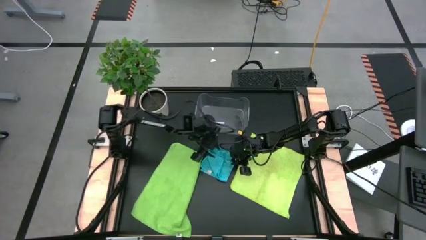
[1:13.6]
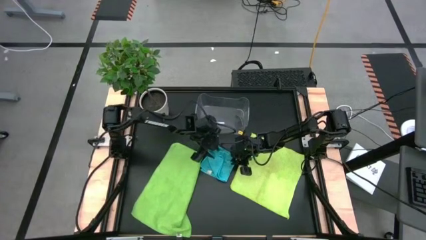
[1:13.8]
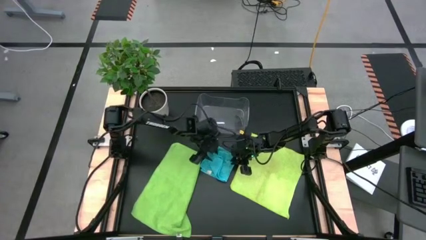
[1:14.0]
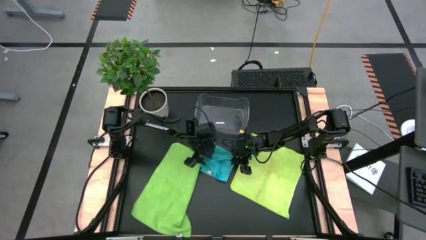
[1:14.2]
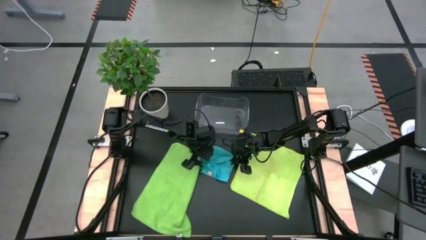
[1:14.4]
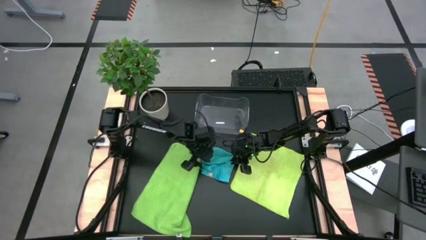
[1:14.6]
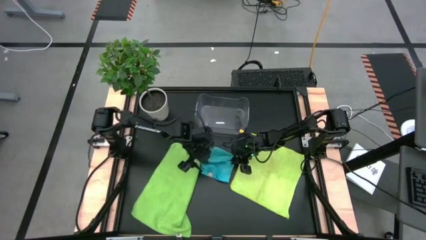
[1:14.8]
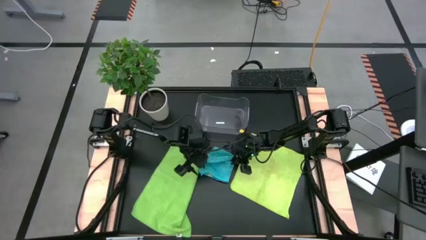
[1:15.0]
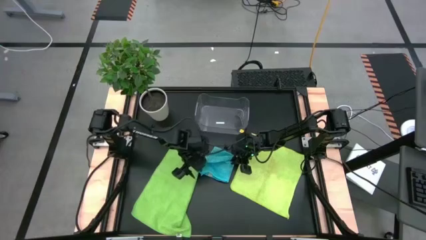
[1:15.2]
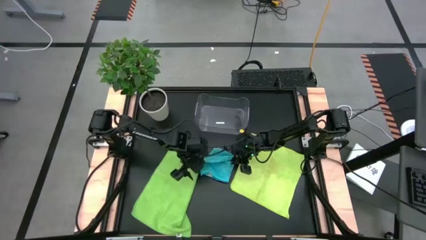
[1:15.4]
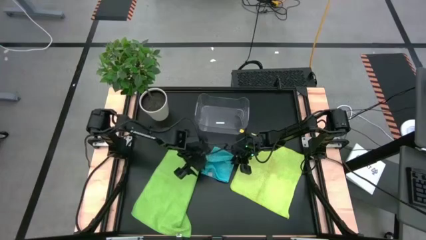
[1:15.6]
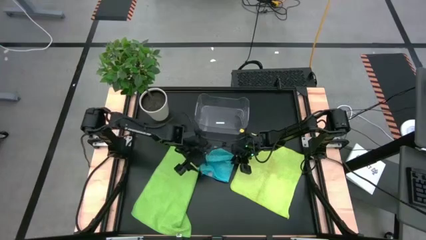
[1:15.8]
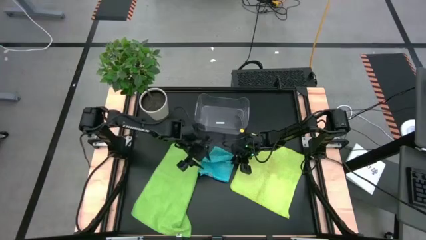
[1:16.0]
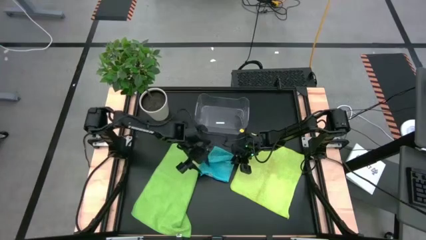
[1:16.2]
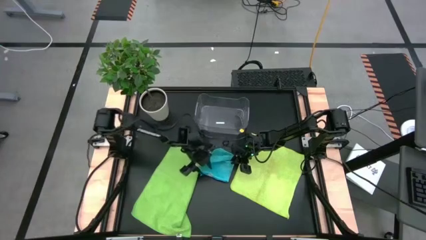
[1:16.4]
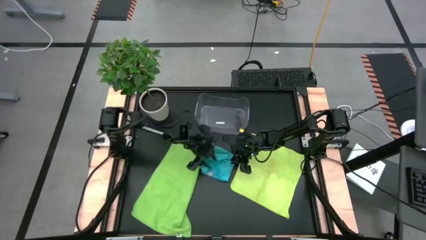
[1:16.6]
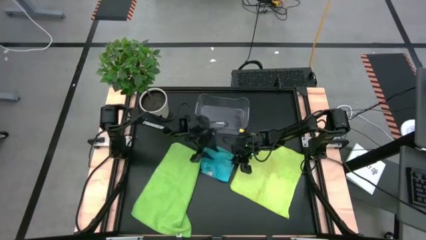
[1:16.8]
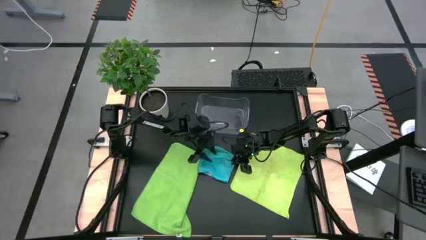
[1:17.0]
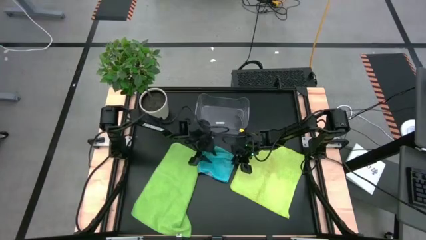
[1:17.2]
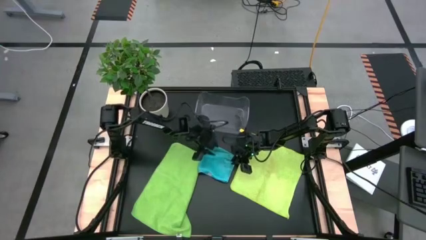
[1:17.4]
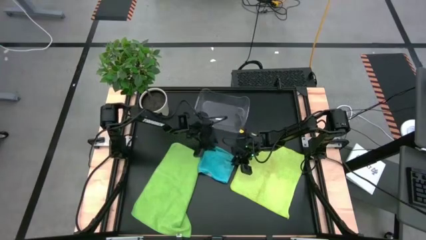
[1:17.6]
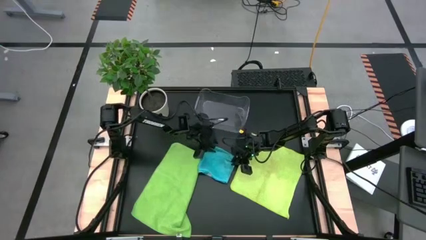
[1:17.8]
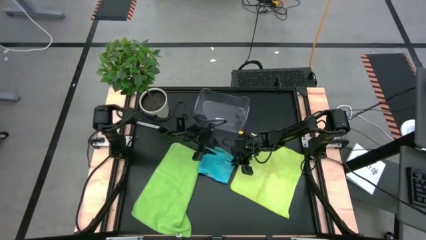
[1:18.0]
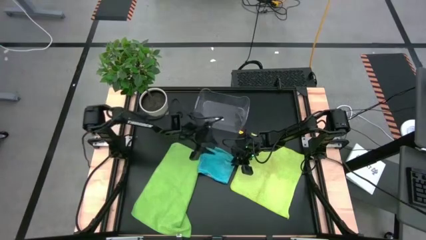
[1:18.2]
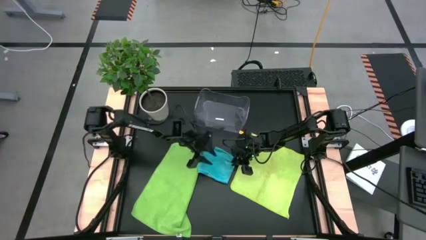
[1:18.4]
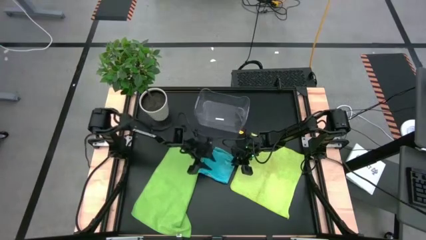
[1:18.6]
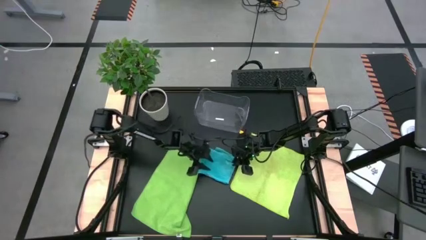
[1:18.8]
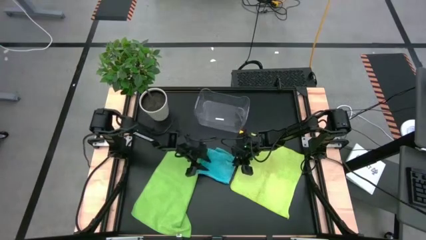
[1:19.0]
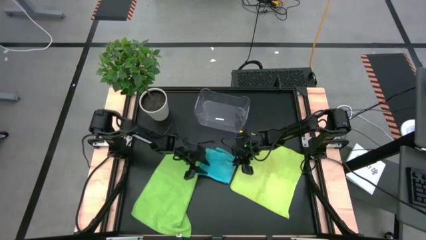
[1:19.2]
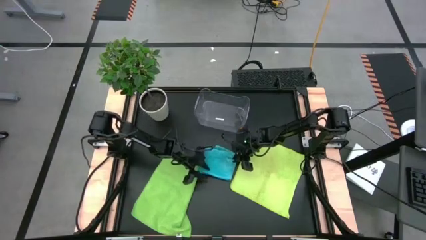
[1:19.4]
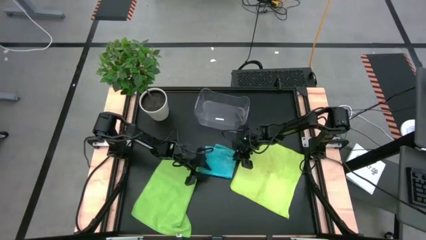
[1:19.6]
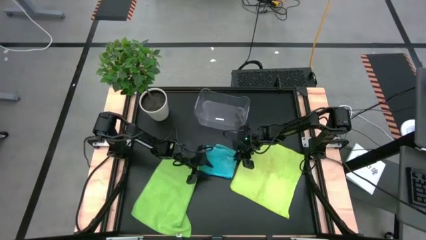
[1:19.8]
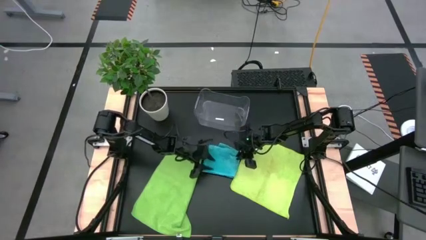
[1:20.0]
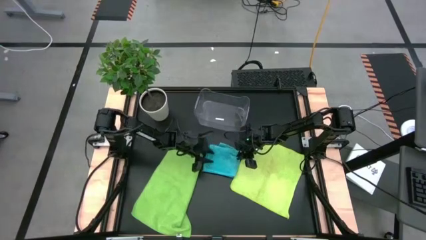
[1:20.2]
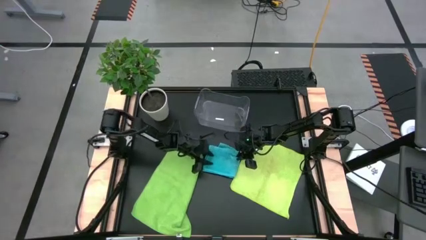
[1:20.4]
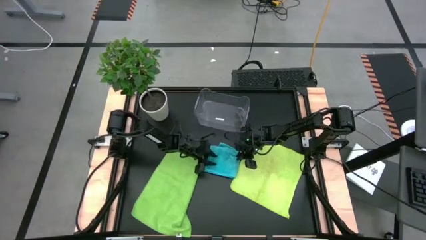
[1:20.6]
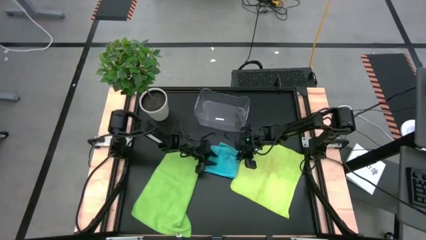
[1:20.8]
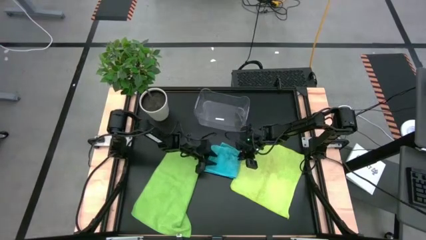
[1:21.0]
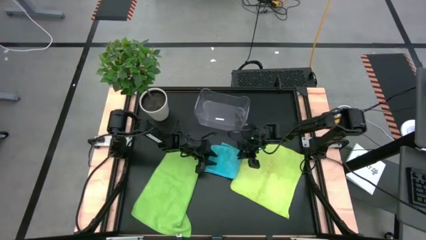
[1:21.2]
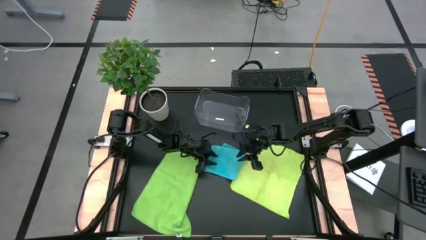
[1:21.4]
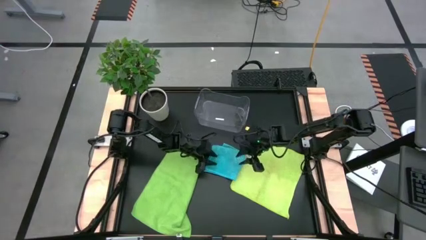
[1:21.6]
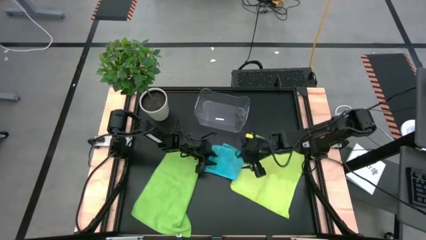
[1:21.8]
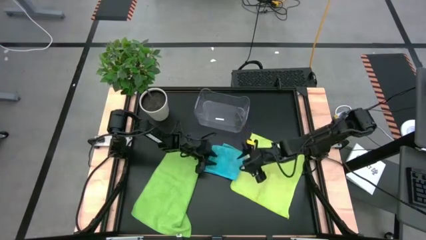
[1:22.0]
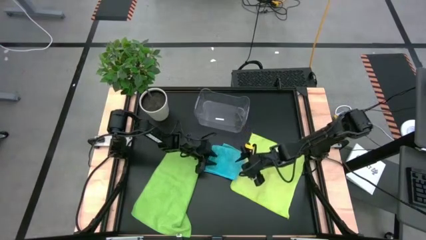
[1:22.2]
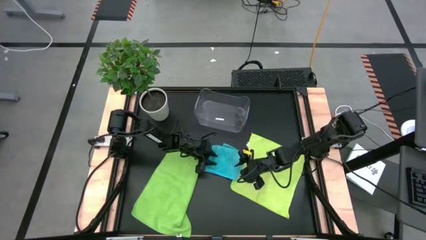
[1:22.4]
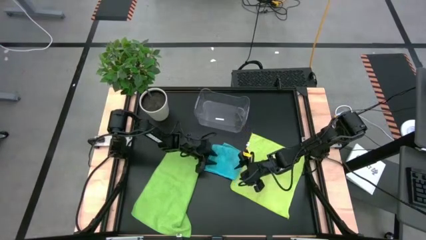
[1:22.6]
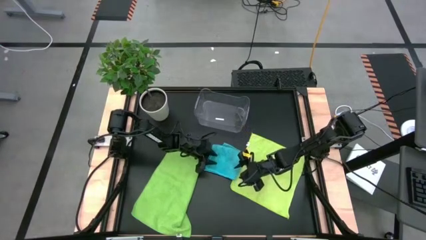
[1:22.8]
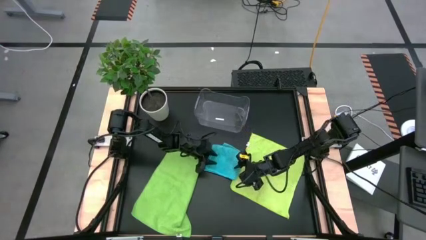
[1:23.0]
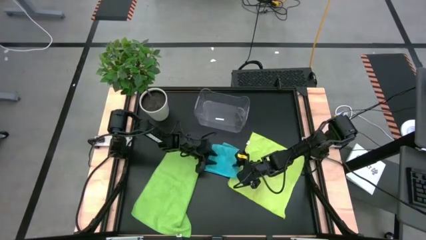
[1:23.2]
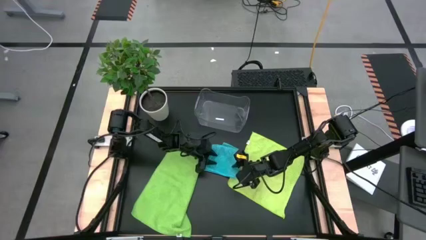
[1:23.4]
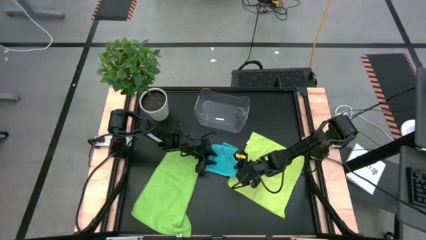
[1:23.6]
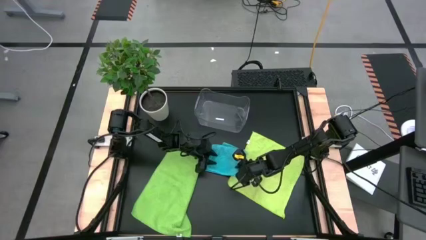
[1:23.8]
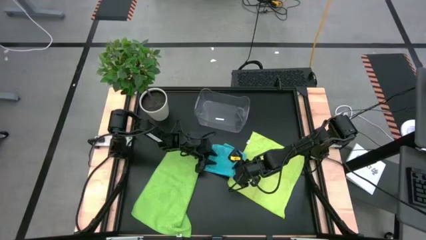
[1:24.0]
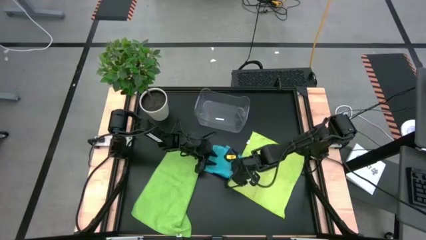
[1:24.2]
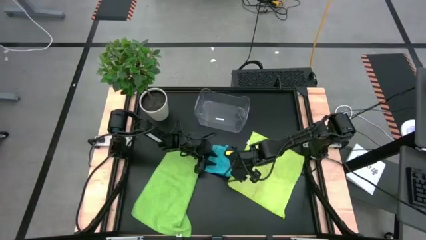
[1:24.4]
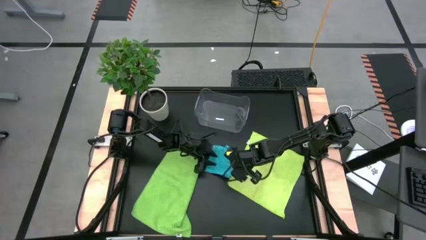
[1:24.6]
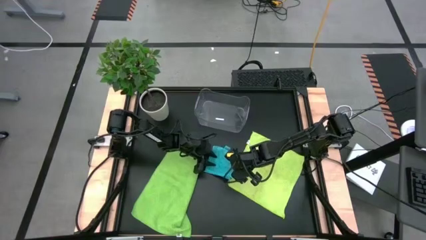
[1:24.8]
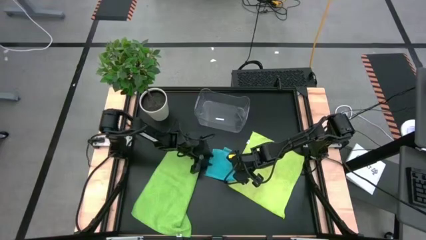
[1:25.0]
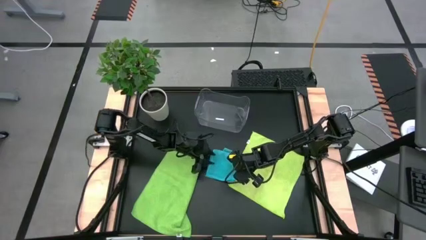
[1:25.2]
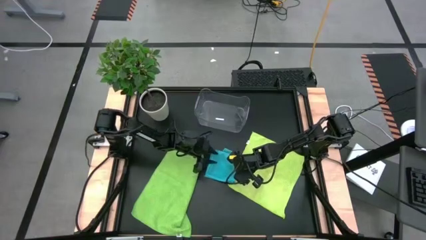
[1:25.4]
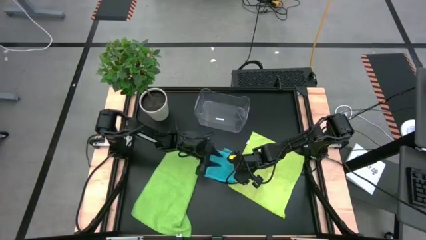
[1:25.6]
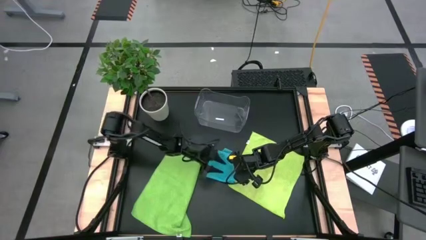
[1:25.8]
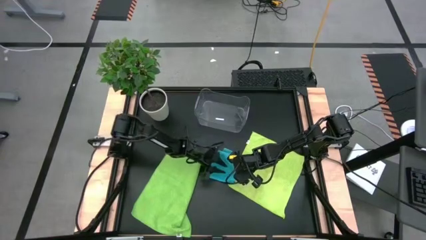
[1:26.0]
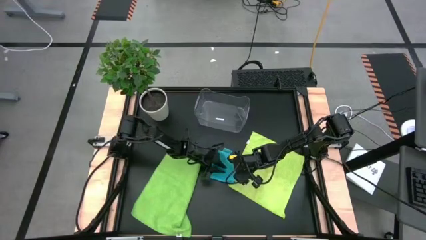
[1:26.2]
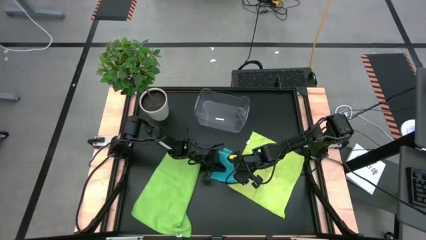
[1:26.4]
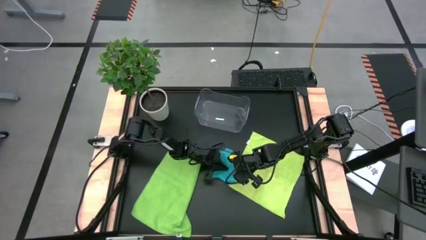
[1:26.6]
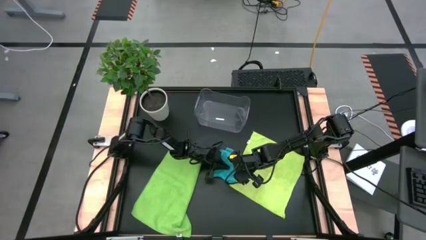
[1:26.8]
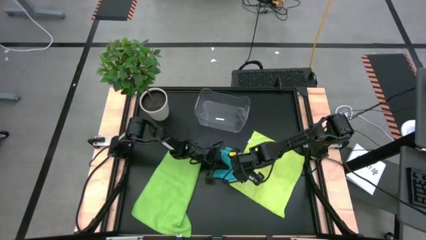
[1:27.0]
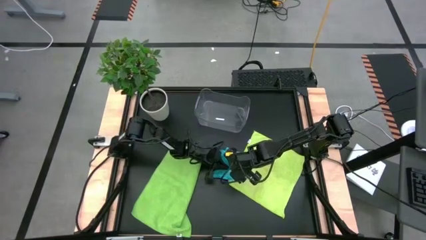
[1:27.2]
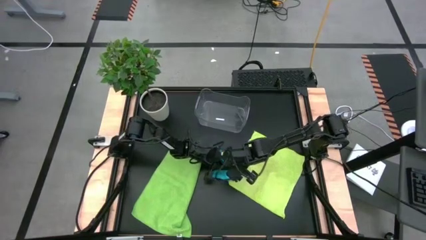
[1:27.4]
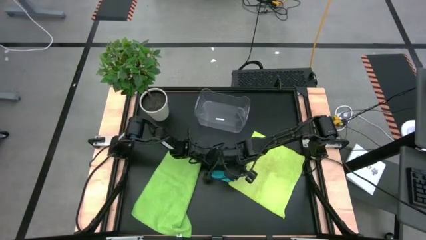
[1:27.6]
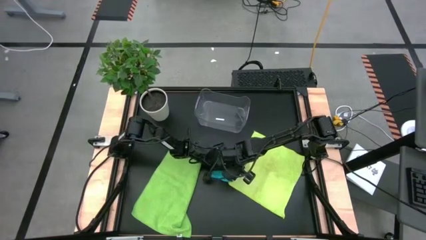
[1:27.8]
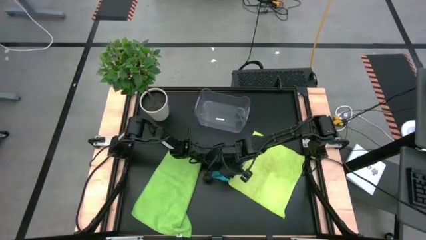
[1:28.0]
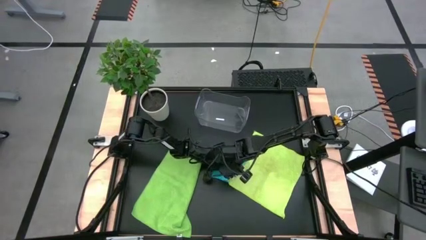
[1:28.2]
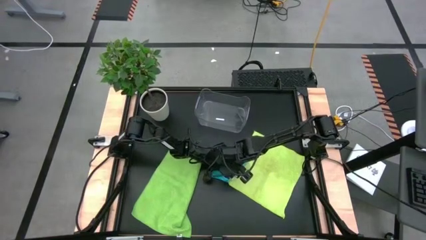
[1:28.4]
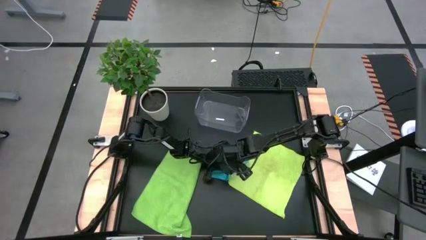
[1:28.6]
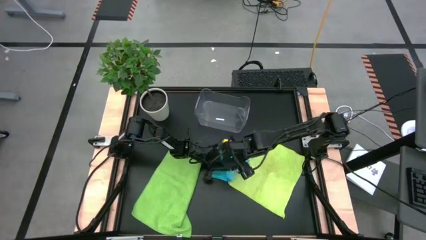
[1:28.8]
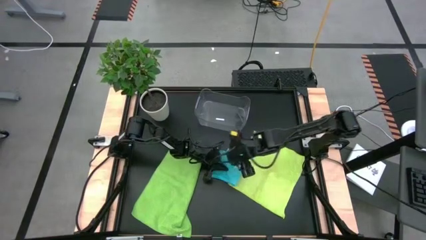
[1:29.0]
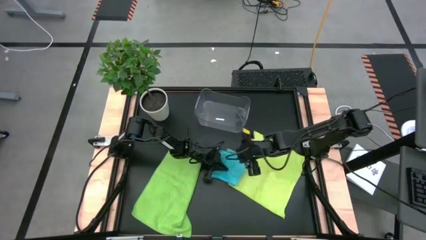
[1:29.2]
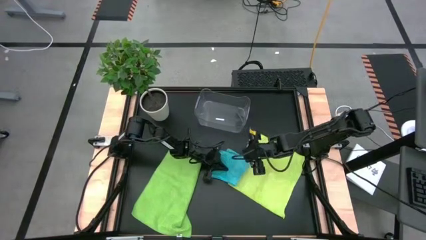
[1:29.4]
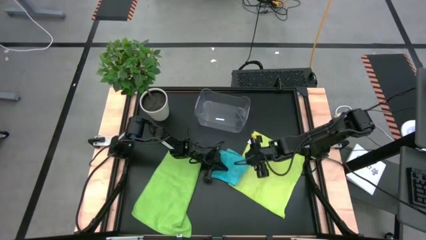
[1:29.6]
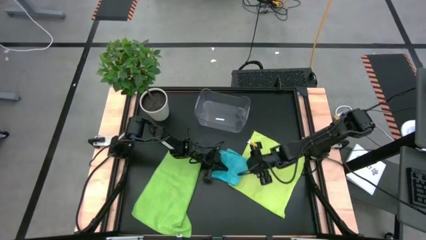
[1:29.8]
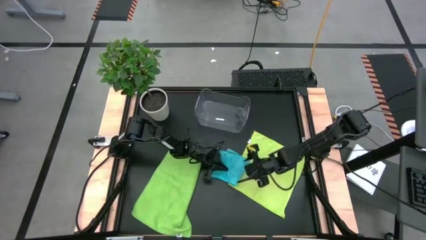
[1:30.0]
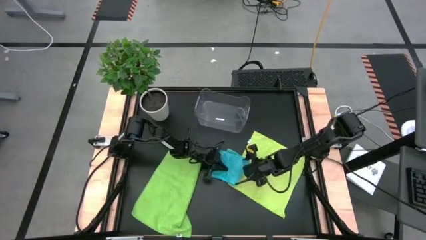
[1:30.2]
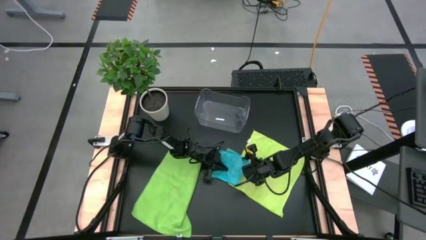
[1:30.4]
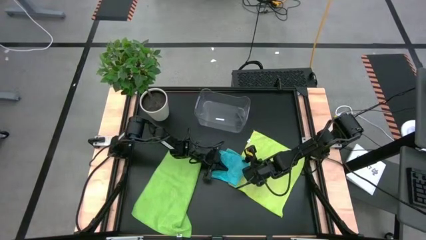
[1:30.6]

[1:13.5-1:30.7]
Task: Fold microfiber towels
Fold the blue microfiber cloth
